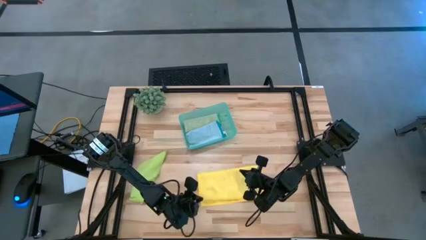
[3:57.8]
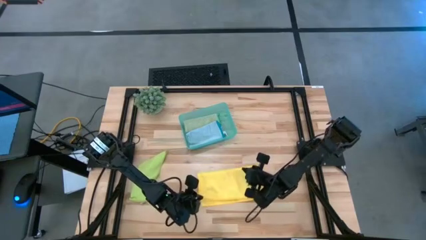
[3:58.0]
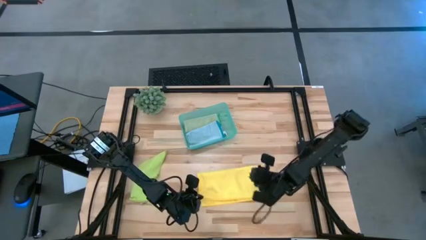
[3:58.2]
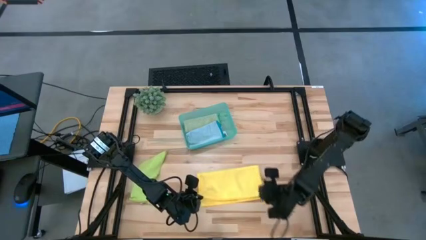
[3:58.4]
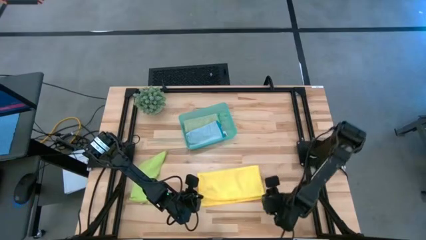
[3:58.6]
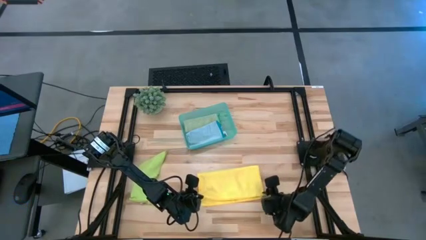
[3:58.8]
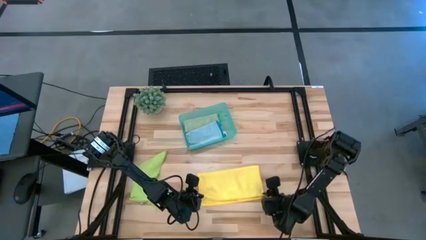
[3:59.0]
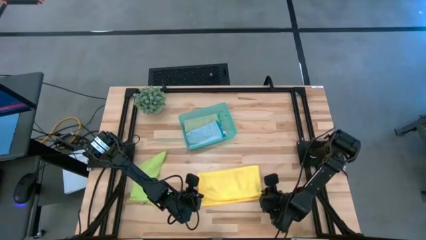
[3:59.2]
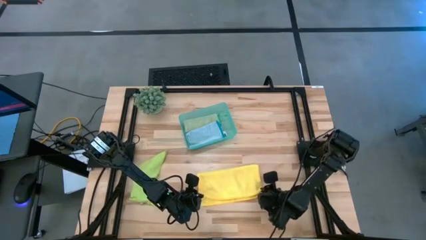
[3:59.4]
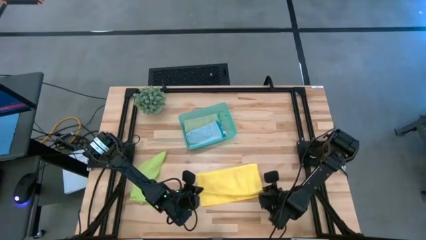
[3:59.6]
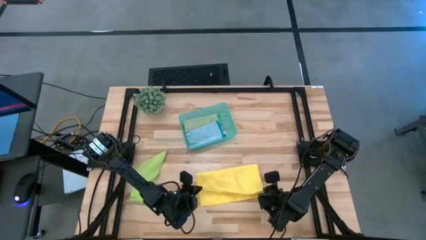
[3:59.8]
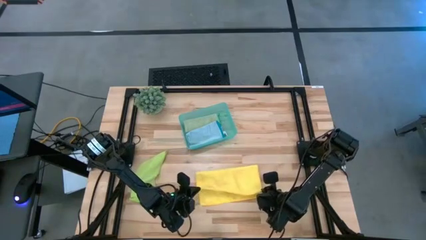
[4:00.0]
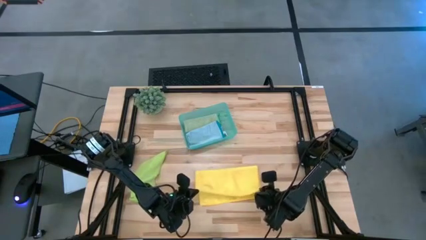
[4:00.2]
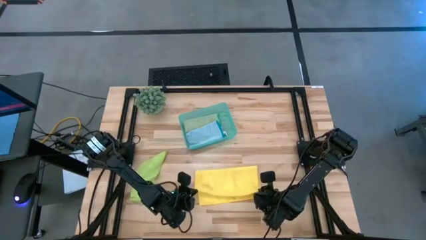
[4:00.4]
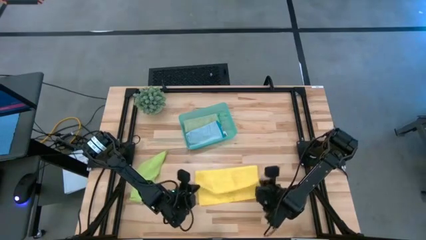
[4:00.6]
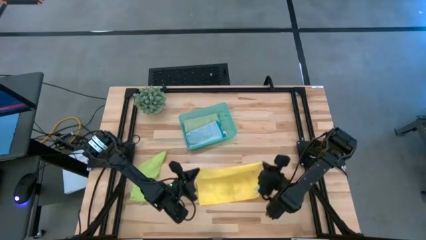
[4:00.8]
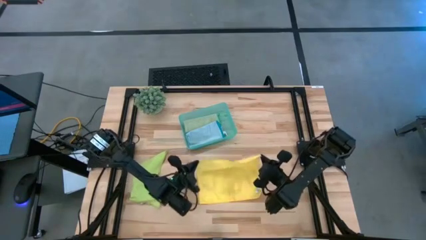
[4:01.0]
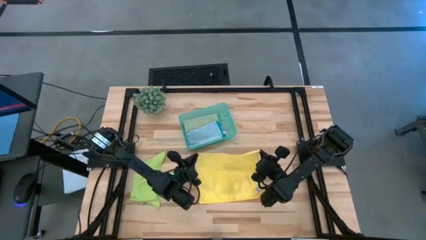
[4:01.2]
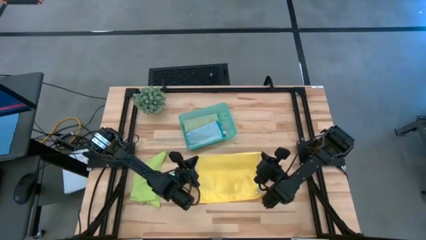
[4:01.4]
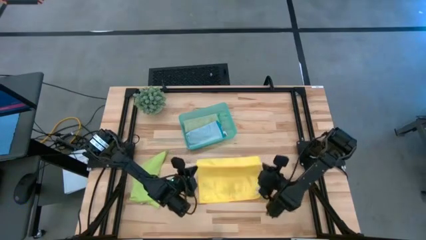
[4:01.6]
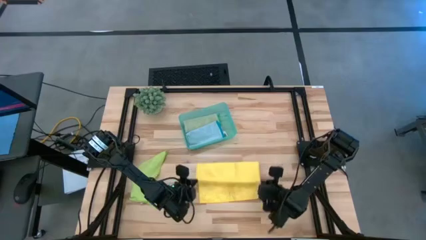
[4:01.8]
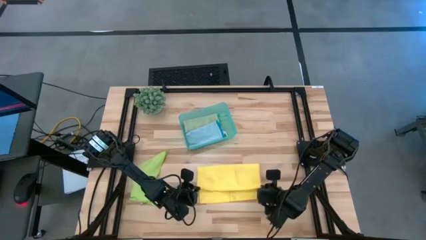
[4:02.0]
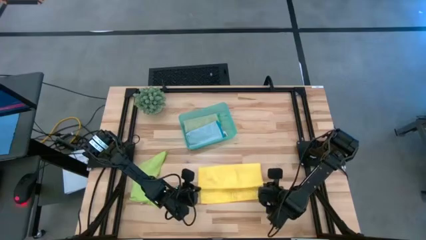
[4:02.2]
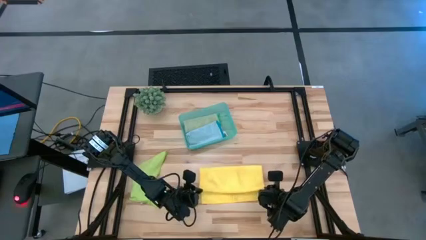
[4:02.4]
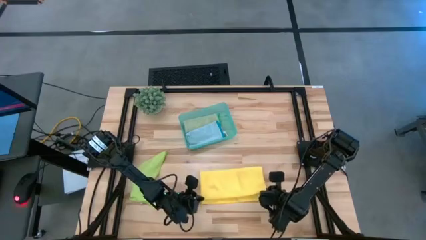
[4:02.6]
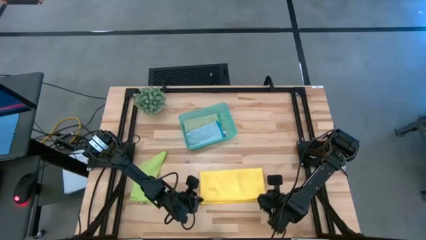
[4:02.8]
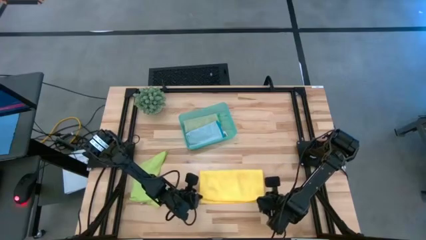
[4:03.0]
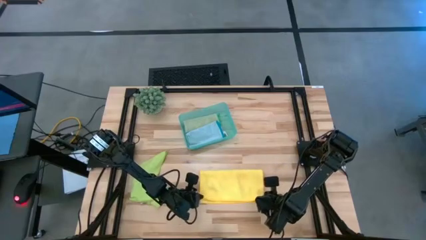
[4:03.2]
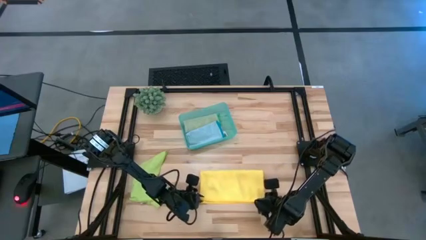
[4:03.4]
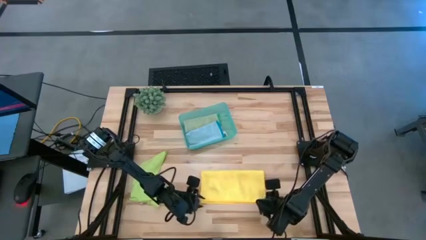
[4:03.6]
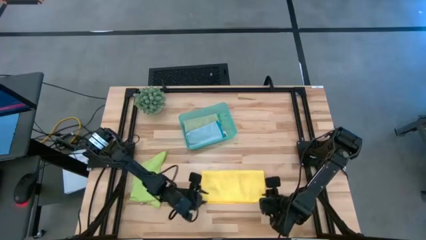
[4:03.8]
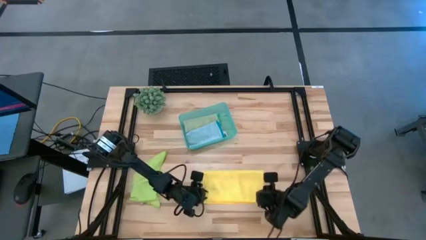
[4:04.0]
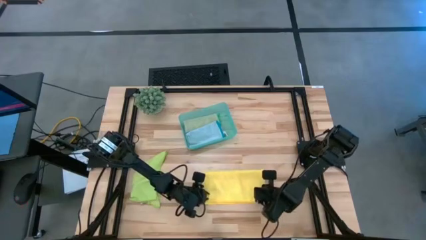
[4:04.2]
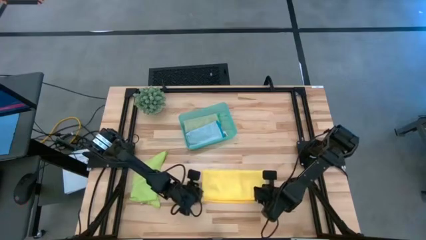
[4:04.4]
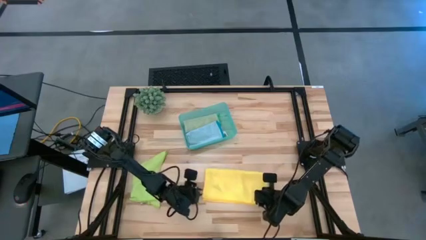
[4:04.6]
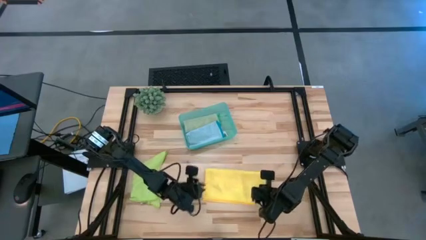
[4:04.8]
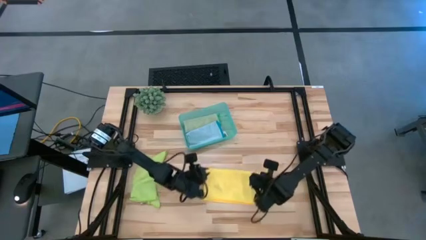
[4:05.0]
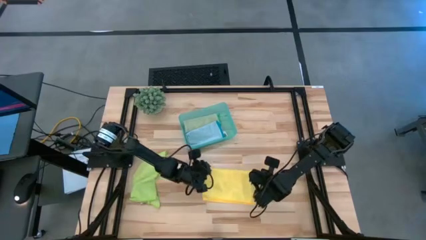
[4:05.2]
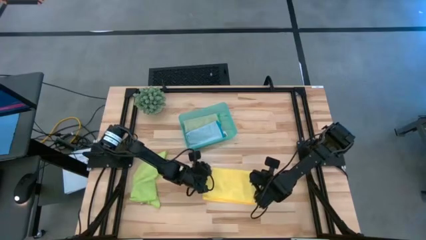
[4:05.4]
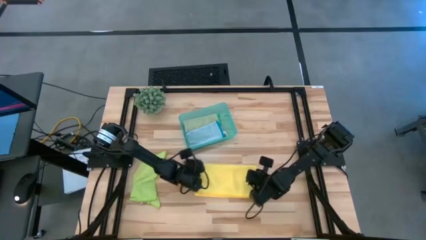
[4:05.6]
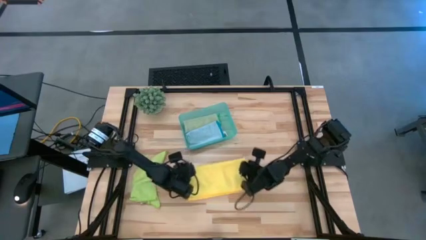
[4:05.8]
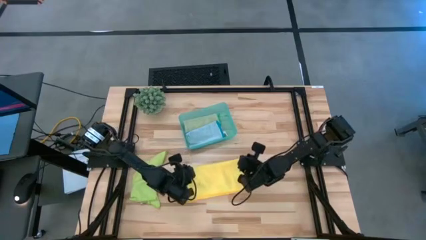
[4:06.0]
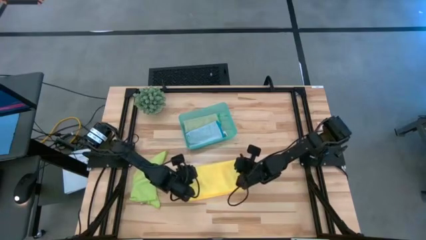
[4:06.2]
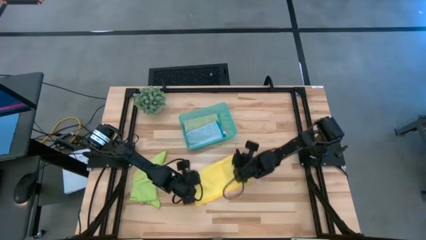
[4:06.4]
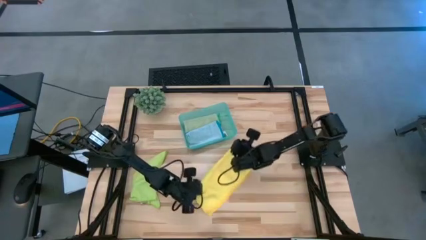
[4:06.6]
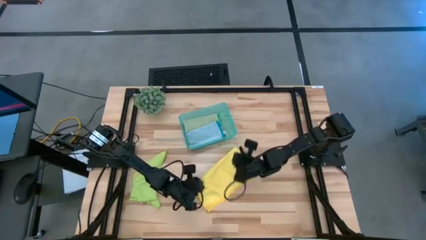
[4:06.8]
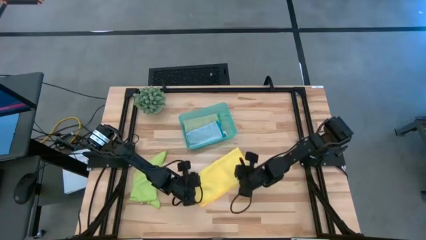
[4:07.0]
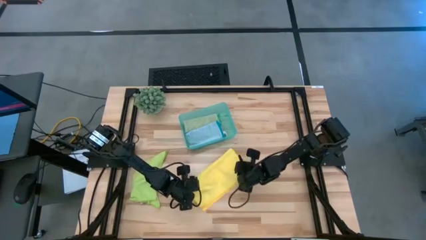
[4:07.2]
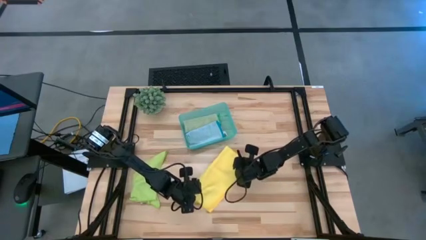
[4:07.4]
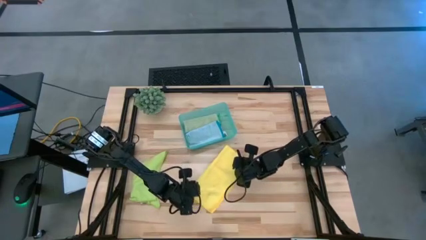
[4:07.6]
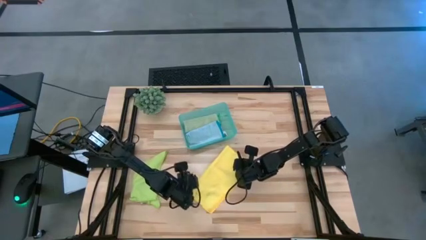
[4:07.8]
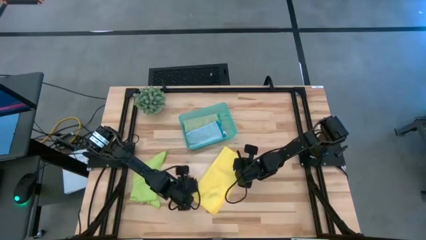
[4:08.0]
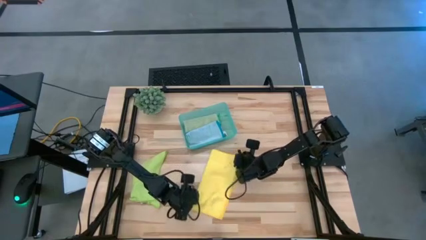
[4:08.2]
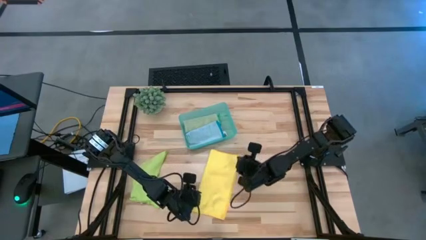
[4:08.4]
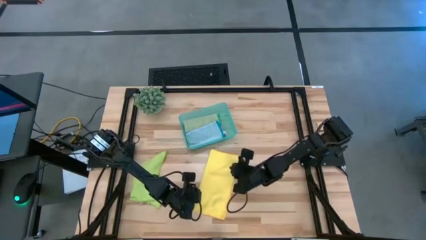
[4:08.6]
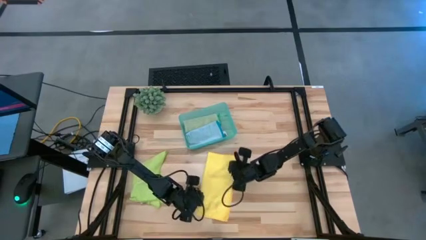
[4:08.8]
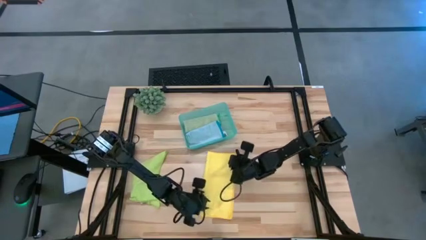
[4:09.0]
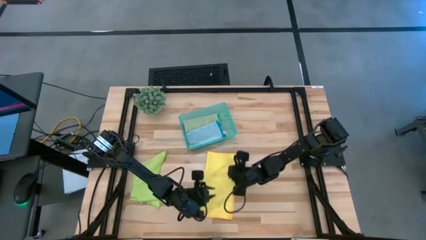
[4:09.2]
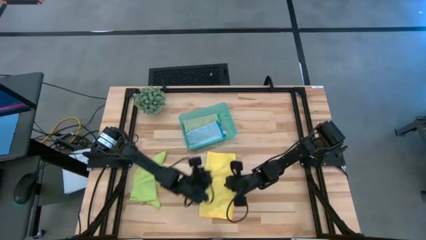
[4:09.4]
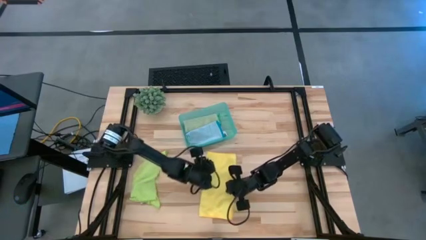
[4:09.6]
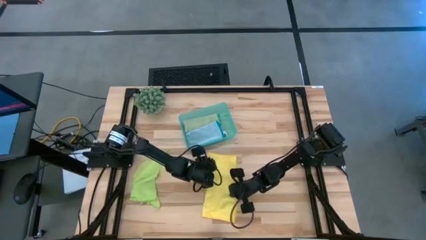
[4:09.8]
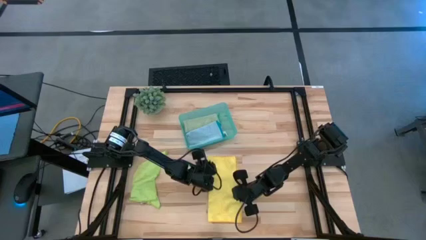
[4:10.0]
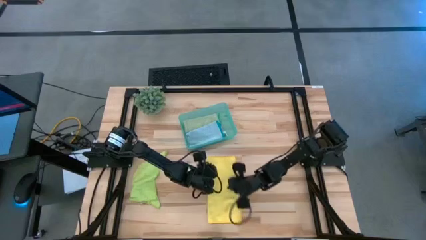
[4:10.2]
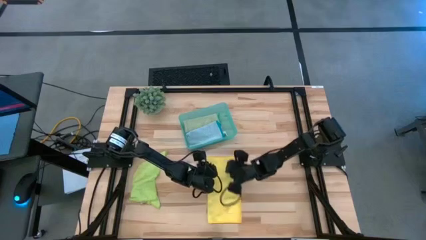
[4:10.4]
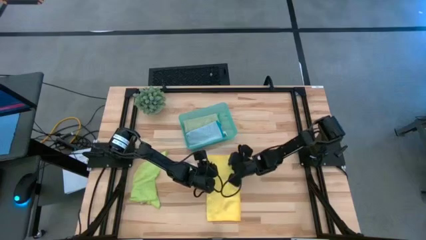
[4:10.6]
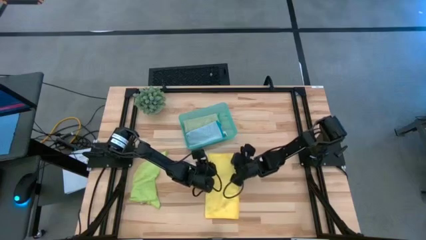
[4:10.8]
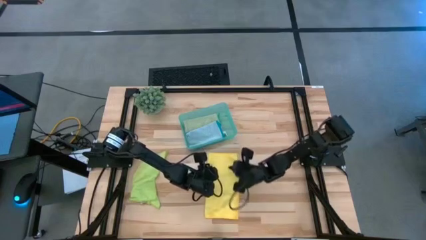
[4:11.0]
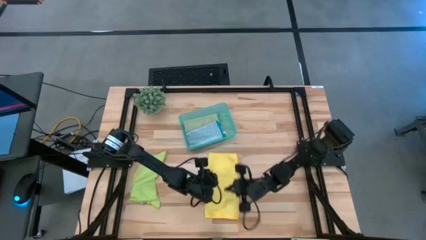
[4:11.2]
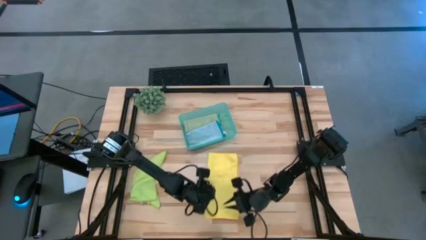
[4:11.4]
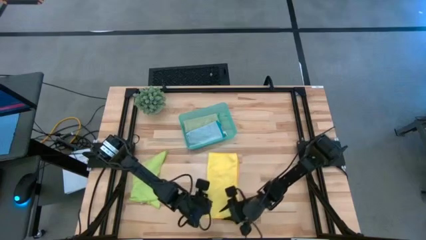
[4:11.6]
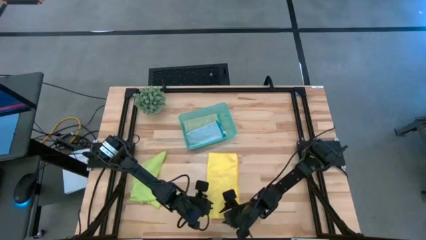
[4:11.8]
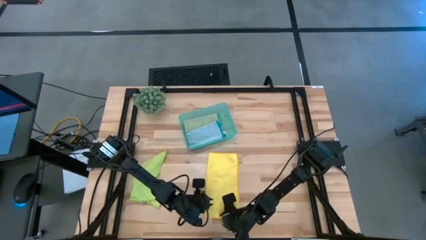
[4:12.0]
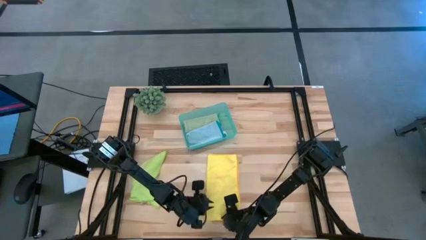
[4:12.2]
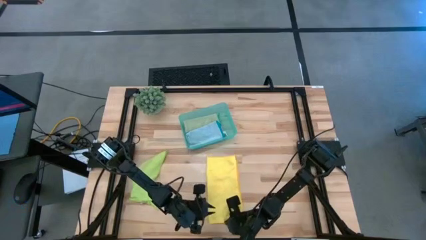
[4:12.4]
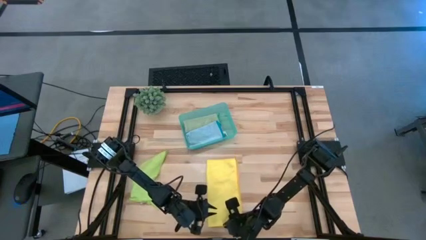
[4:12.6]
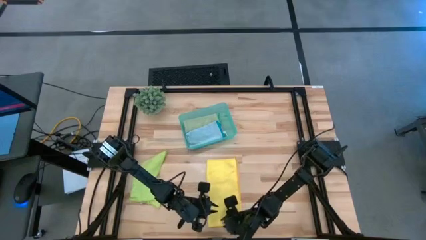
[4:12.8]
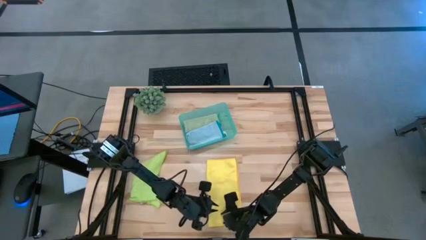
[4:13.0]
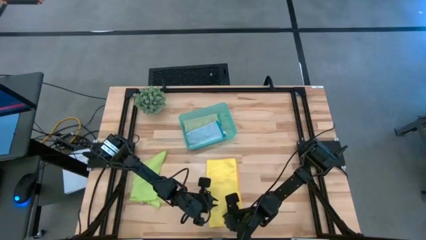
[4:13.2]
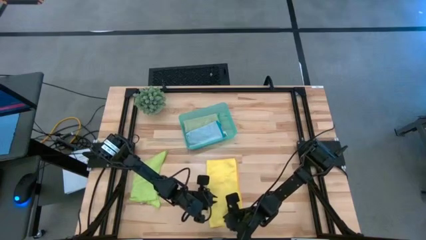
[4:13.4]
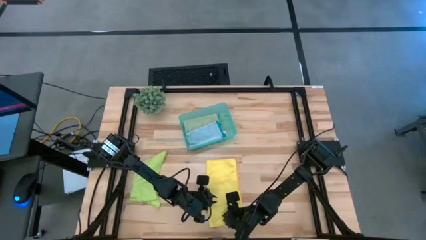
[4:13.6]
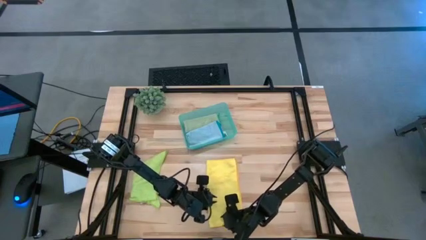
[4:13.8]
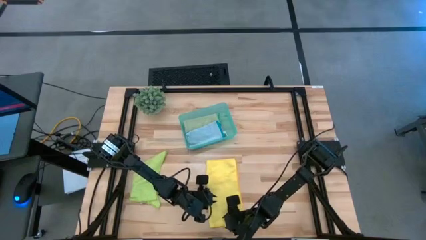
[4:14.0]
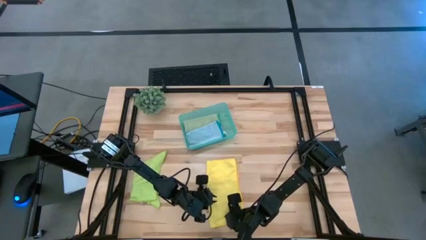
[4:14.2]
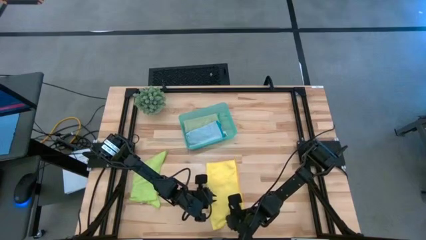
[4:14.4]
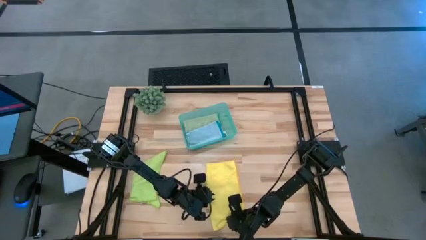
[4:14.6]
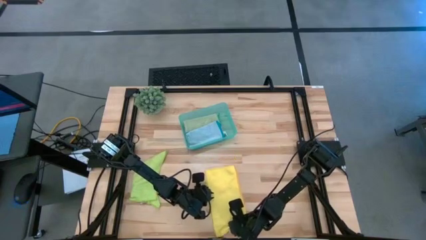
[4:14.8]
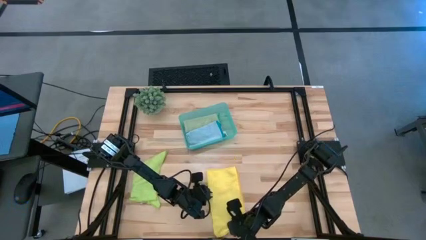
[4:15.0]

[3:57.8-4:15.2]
Task: Fold microfiber towels
Fold the yellow towel
